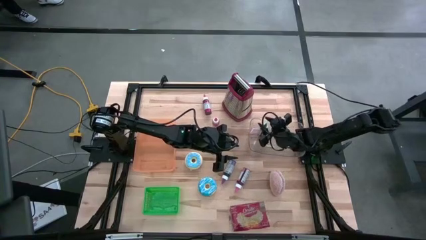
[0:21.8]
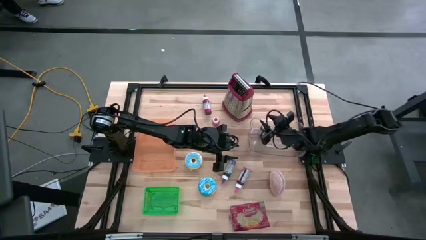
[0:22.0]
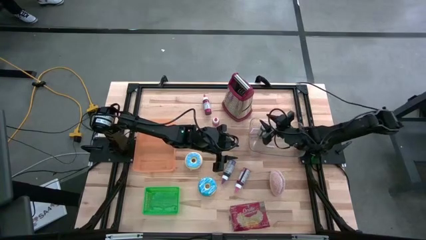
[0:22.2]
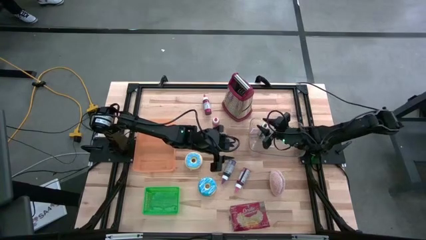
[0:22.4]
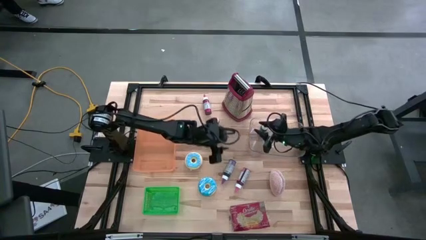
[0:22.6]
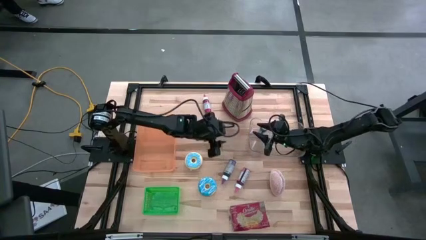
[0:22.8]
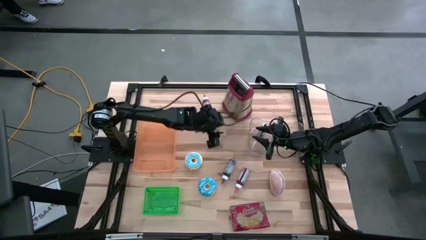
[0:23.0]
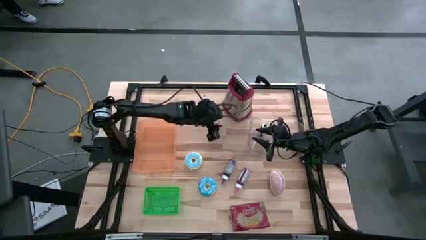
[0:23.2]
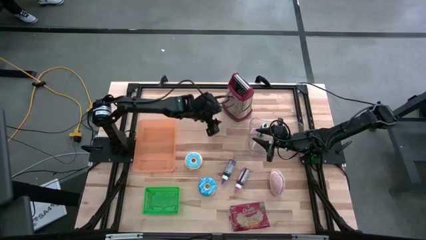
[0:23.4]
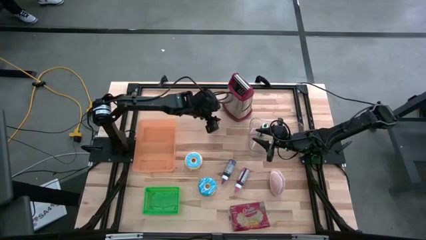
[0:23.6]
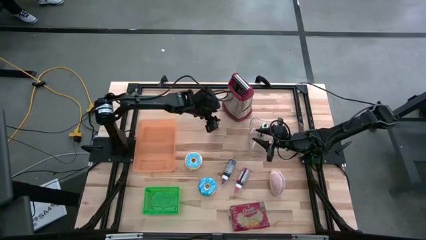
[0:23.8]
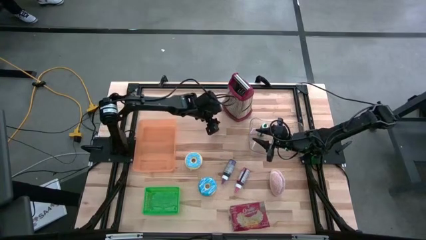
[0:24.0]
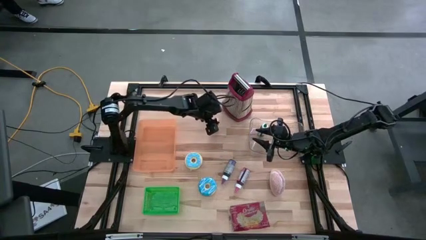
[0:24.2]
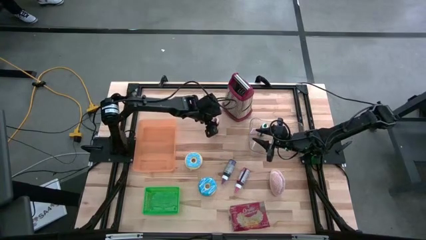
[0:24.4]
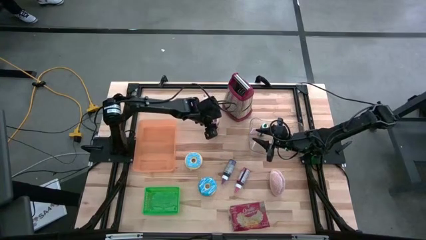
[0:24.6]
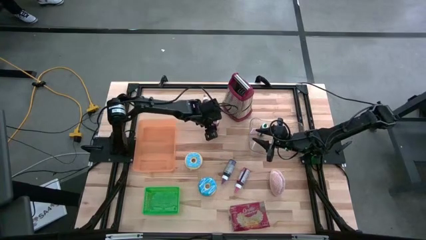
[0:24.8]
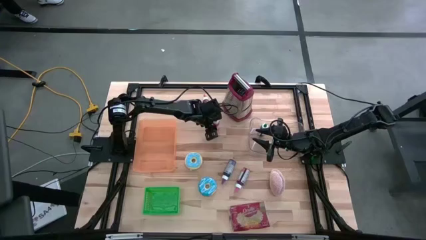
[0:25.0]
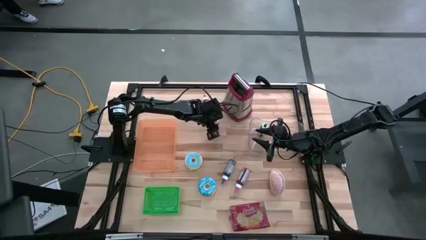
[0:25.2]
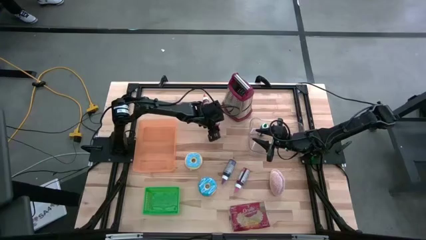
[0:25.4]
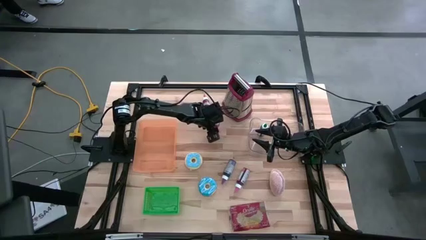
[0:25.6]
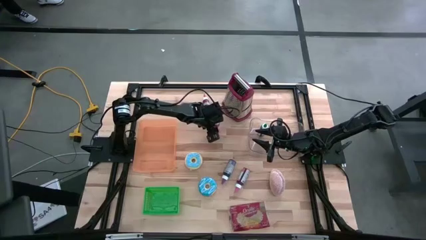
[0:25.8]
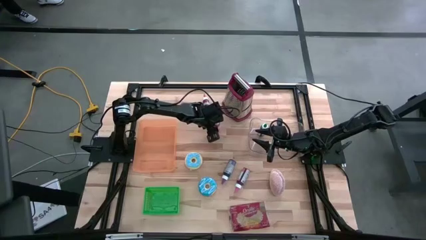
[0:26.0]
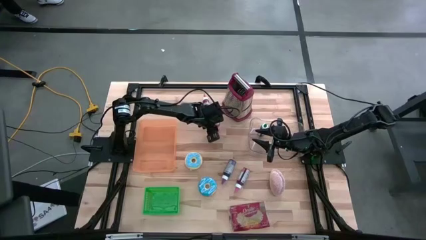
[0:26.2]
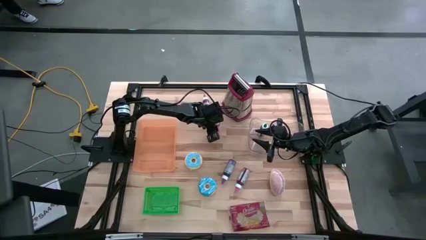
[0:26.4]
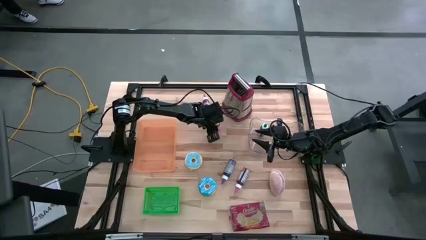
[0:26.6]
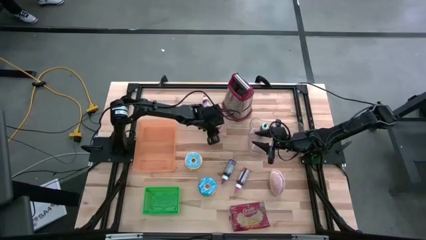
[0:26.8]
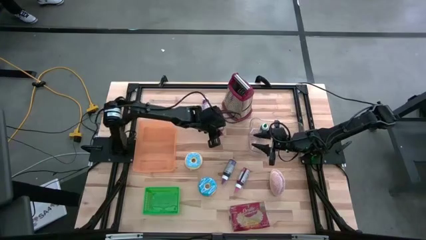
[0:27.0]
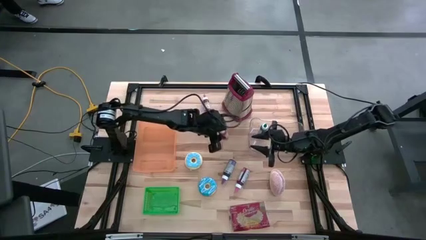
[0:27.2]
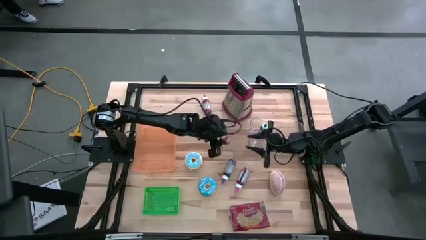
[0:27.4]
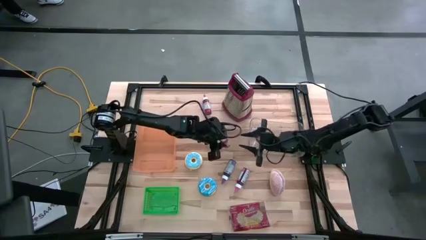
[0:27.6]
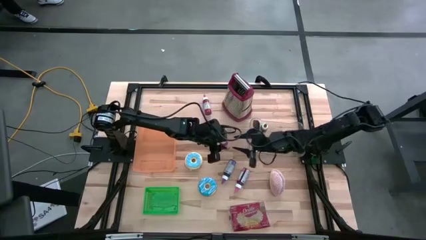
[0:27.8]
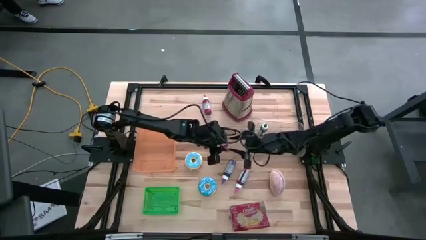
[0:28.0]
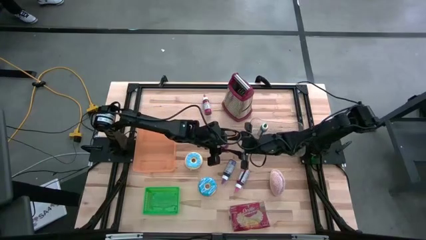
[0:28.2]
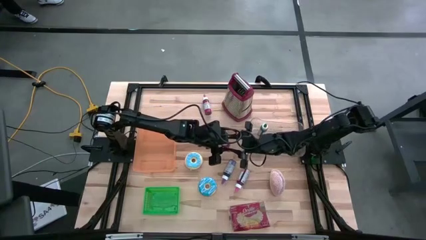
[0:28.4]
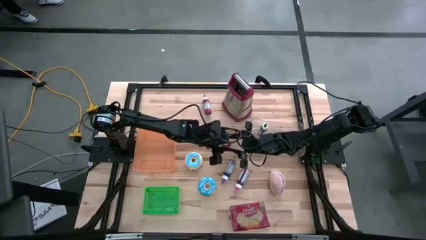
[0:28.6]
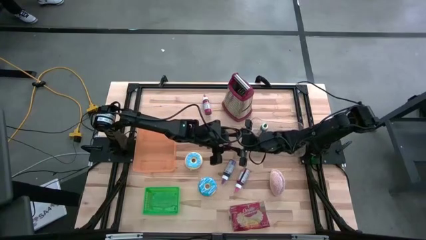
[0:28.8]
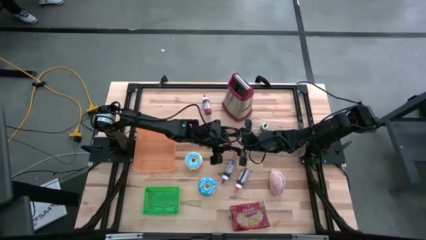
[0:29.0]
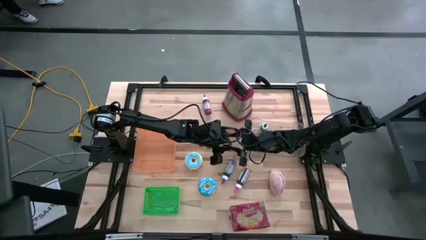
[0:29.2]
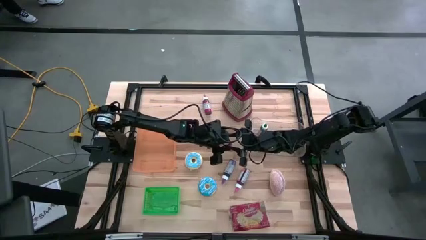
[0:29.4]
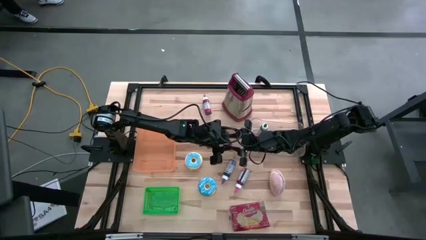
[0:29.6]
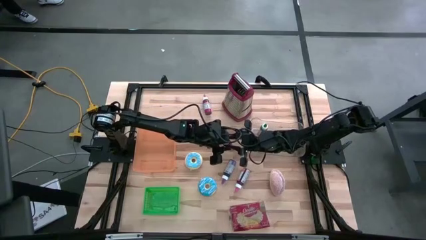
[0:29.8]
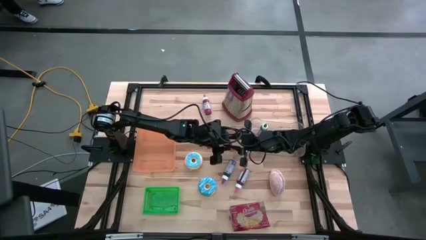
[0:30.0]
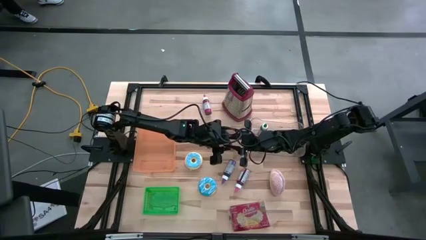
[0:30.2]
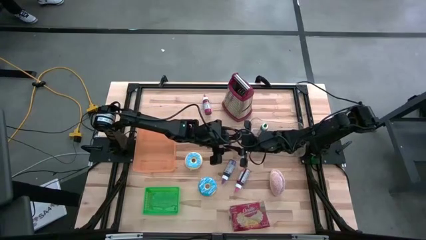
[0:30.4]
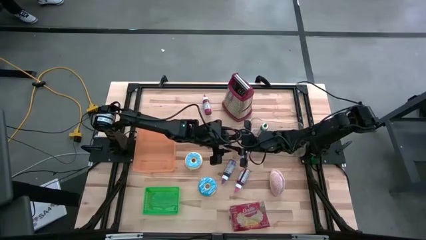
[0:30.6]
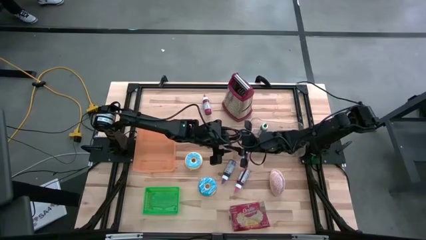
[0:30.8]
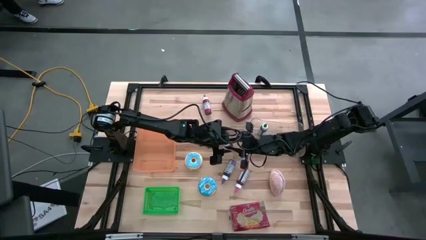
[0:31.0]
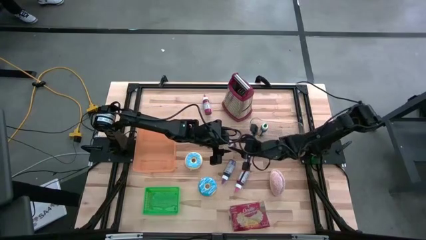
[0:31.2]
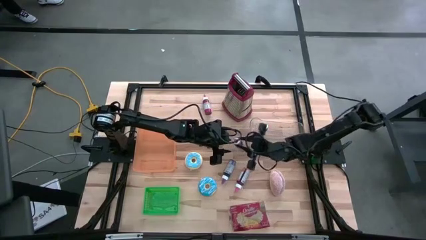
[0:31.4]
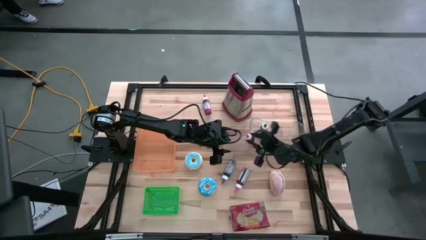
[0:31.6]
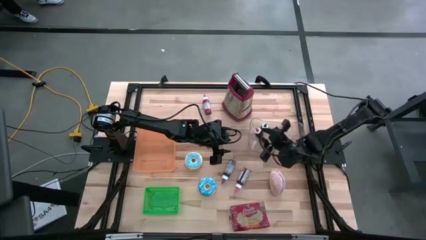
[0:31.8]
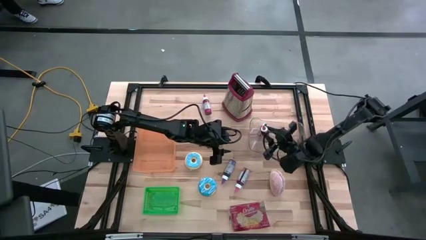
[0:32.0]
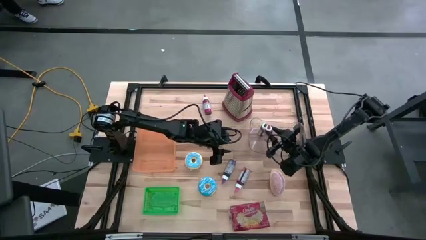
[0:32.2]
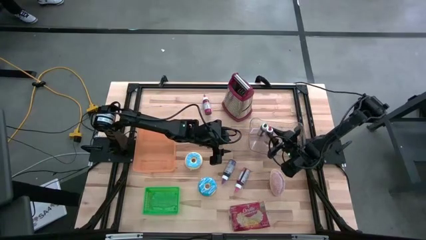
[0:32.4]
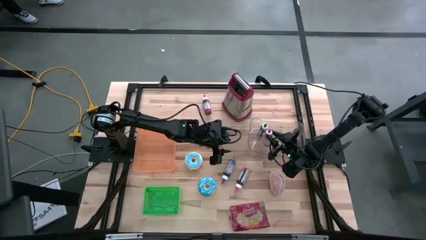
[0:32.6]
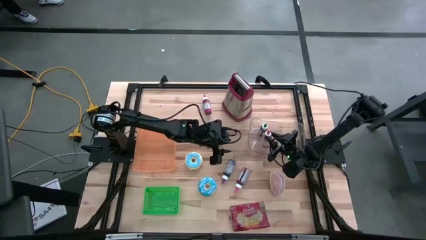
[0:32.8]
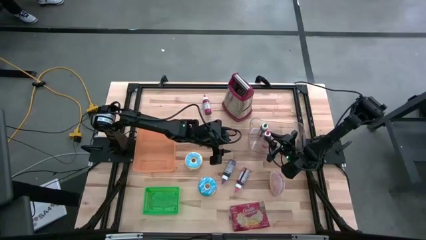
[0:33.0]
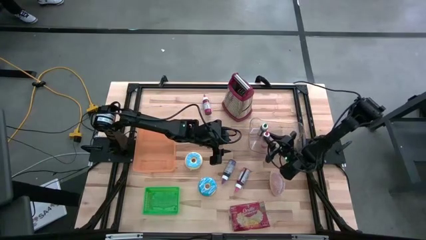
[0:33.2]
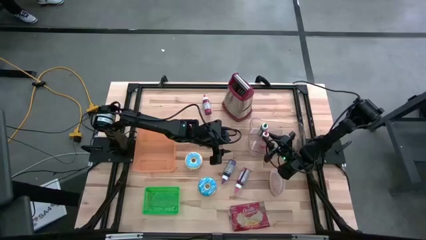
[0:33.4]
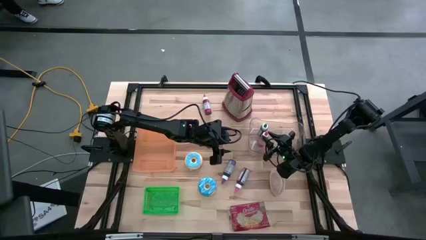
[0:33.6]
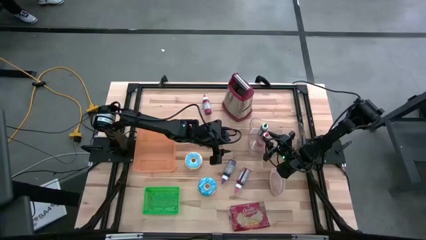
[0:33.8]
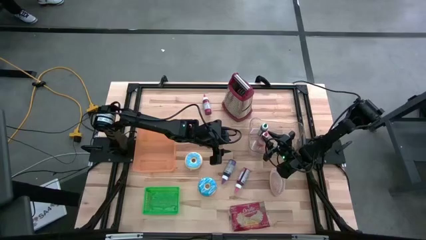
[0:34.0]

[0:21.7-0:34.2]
Put the orange food coloring into the transparent bin

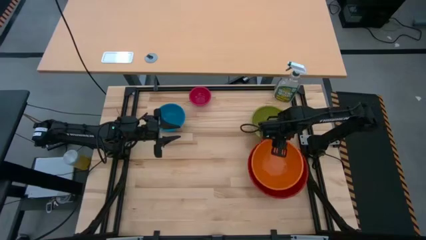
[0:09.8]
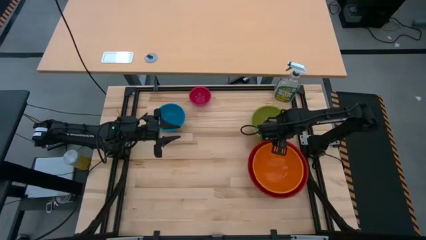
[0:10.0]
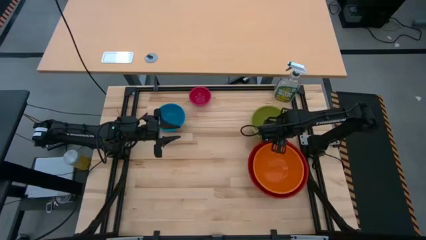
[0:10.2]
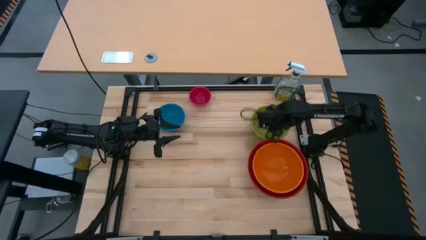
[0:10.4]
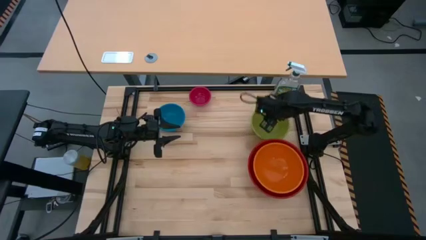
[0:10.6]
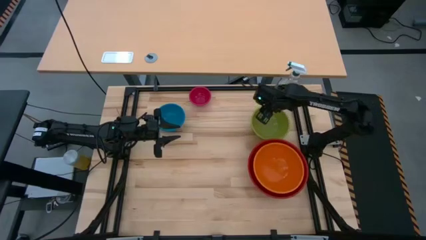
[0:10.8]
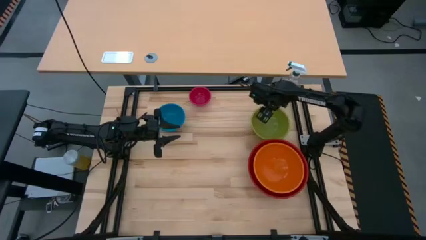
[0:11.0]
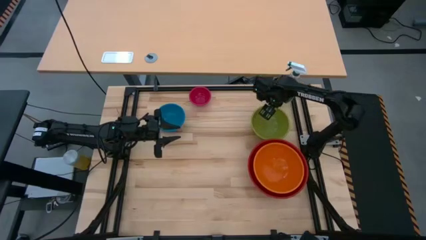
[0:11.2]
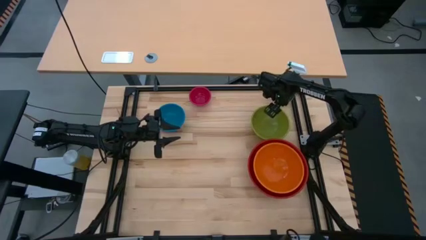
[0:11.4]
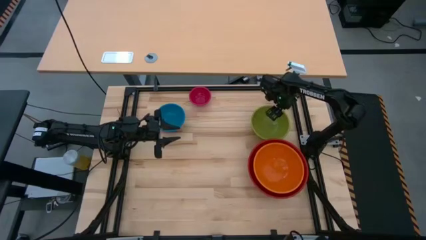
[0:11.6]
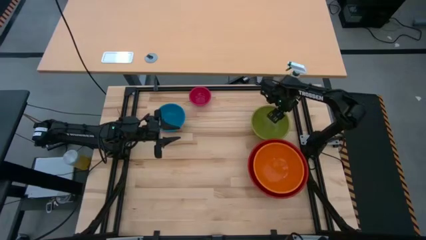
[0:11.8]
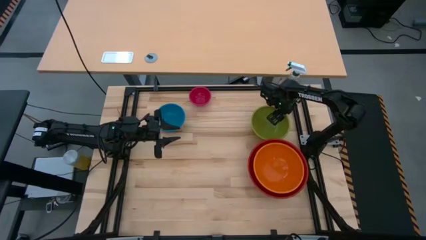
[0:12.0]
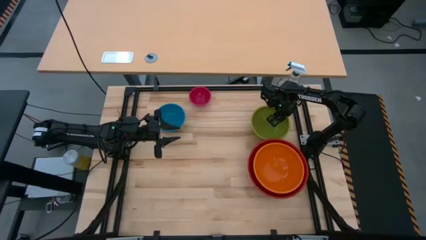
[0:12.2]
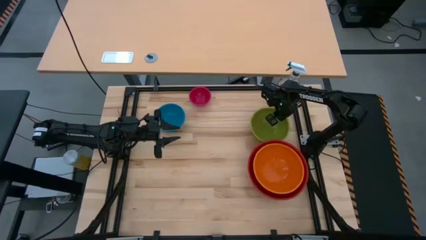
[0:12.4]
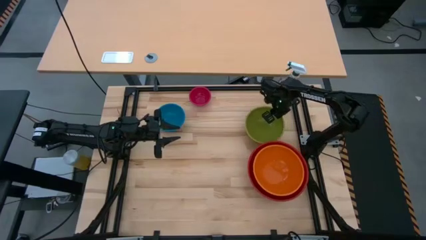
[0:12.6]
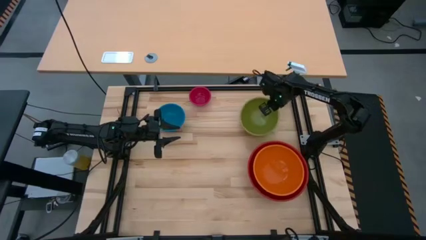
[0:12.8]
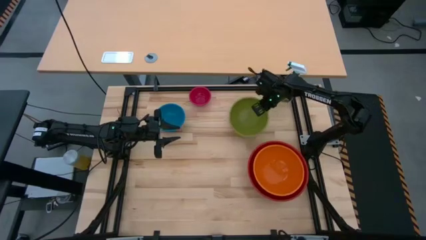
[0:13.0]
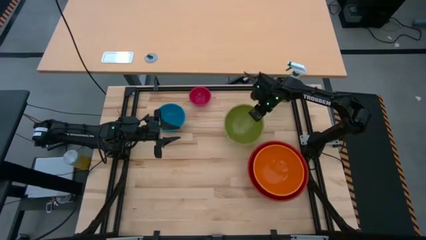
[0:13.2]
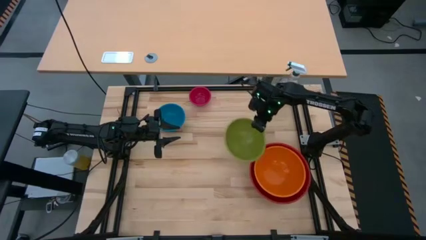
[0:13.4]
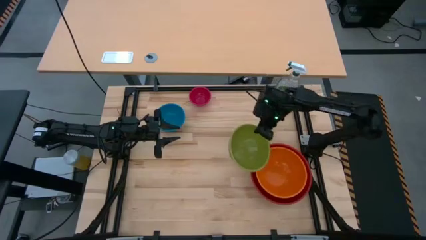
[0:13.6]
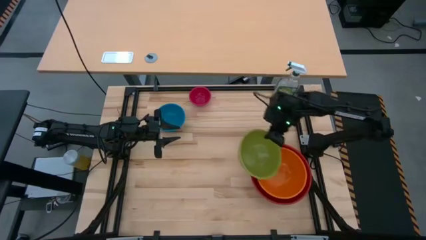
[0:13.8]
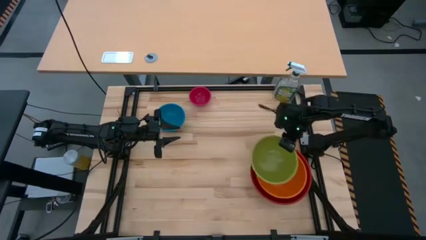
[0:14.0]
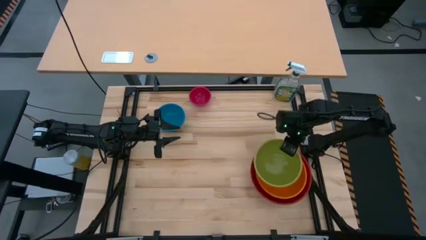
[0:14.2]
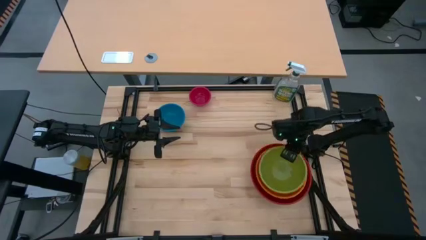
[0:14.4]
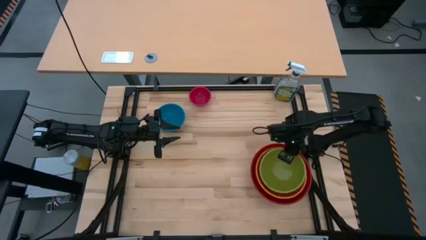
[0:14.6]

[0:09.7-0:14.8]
Stack the green bowl on the orange bowl
